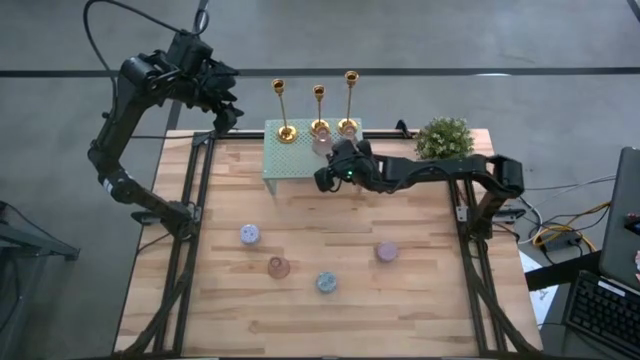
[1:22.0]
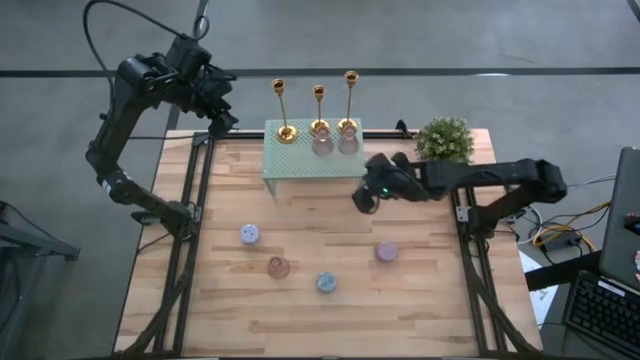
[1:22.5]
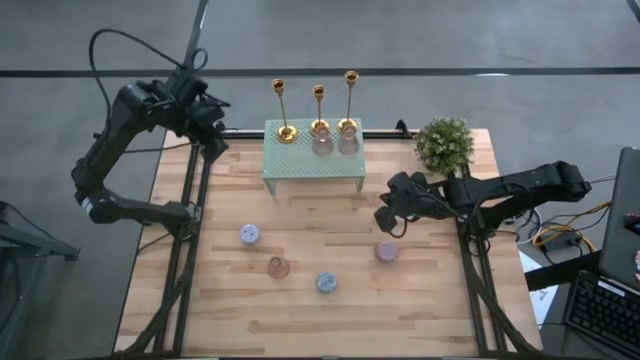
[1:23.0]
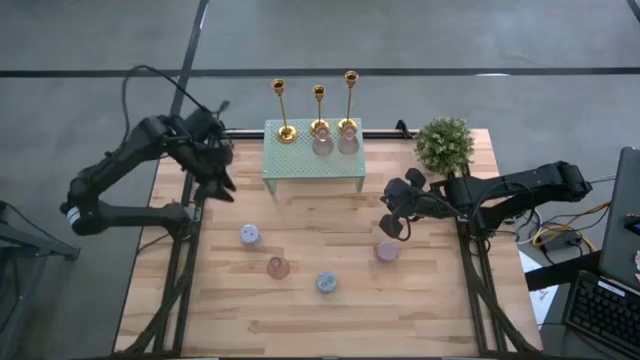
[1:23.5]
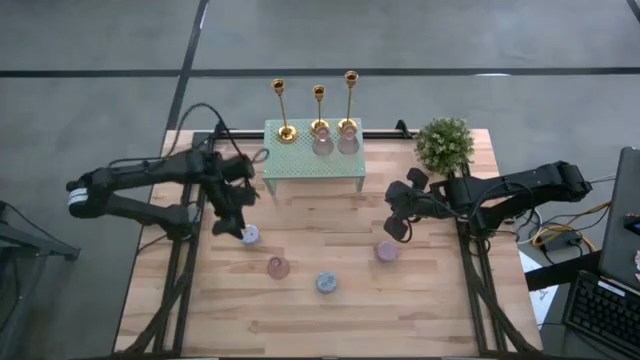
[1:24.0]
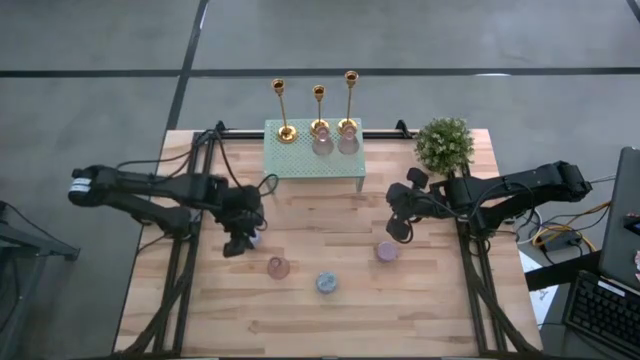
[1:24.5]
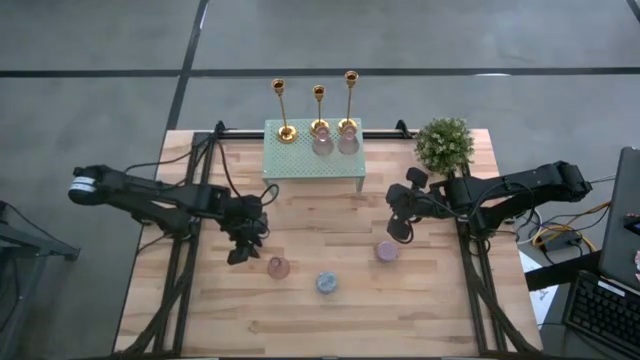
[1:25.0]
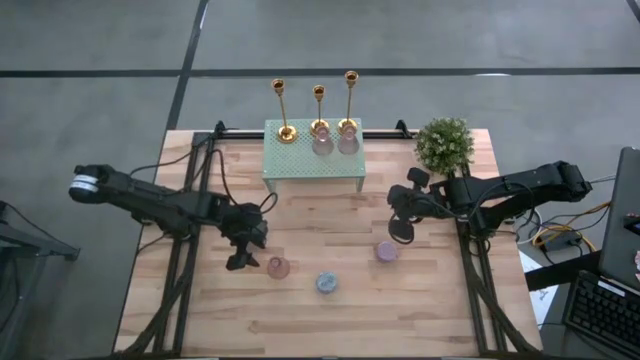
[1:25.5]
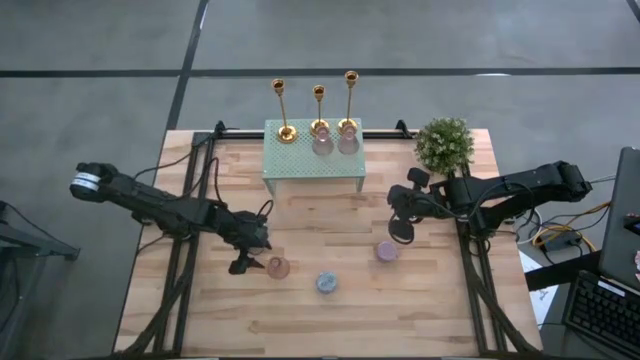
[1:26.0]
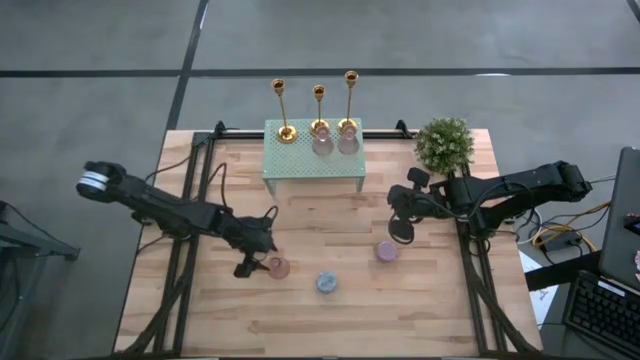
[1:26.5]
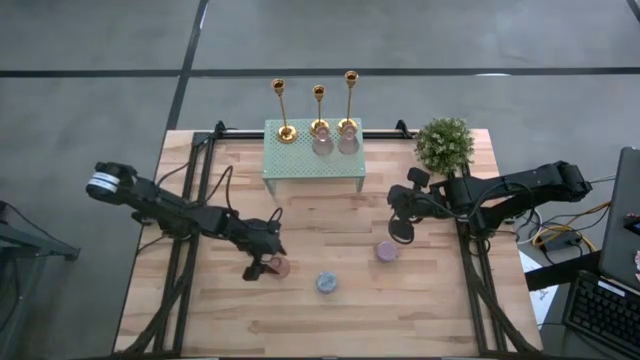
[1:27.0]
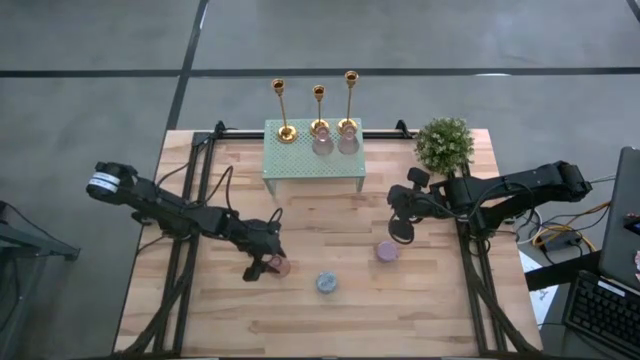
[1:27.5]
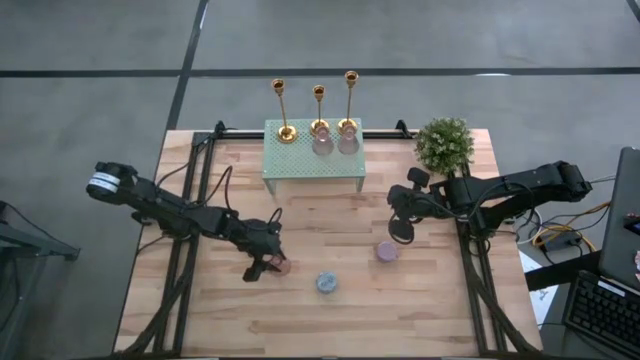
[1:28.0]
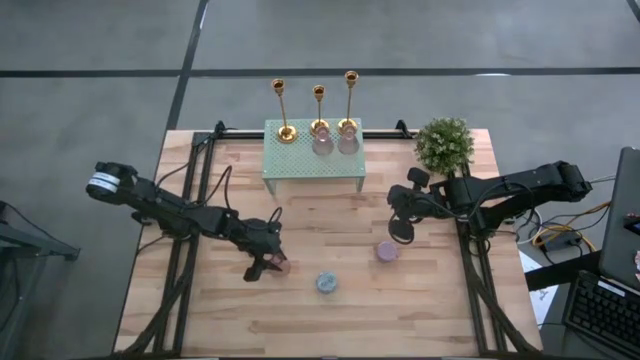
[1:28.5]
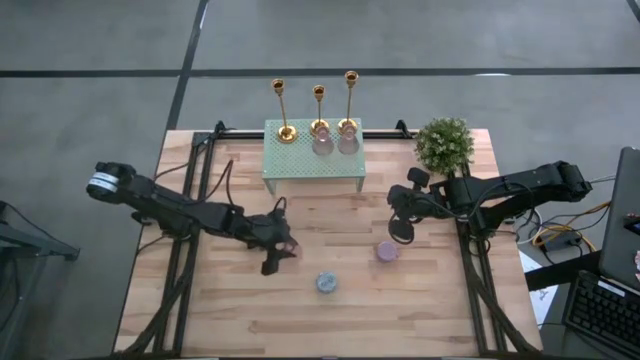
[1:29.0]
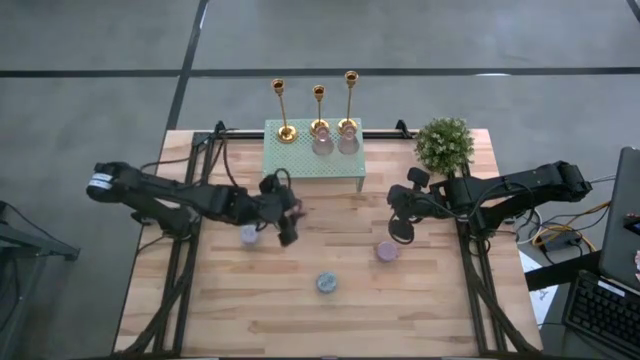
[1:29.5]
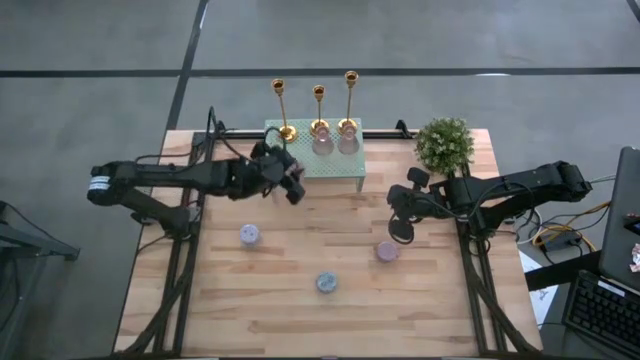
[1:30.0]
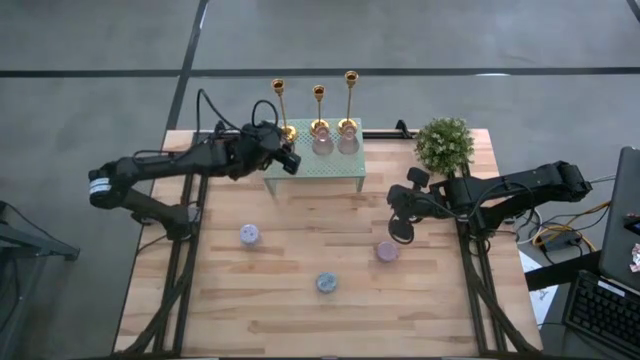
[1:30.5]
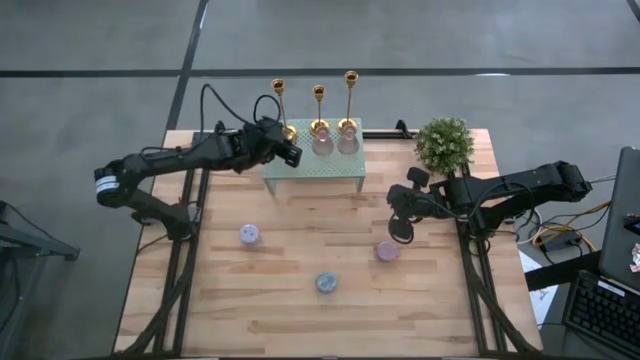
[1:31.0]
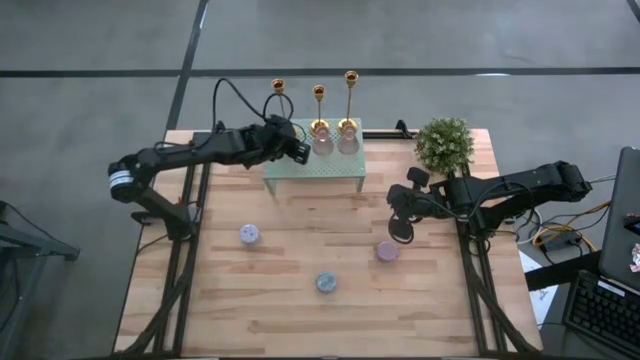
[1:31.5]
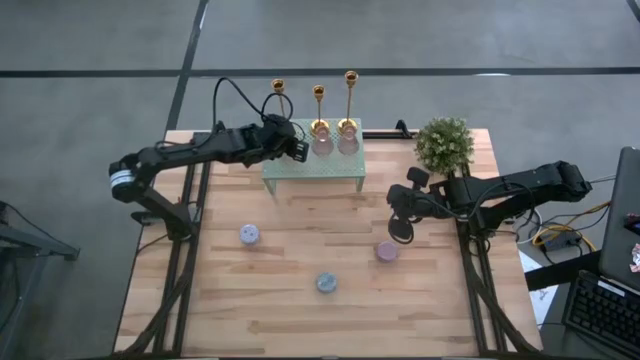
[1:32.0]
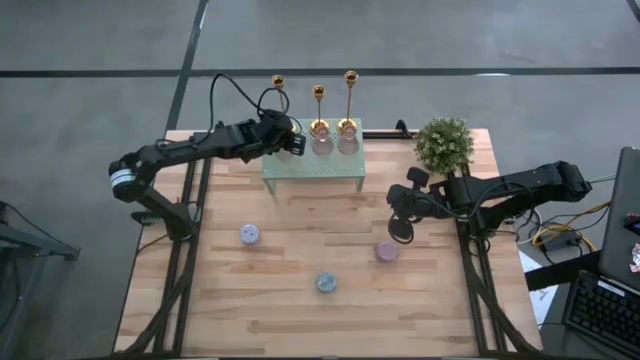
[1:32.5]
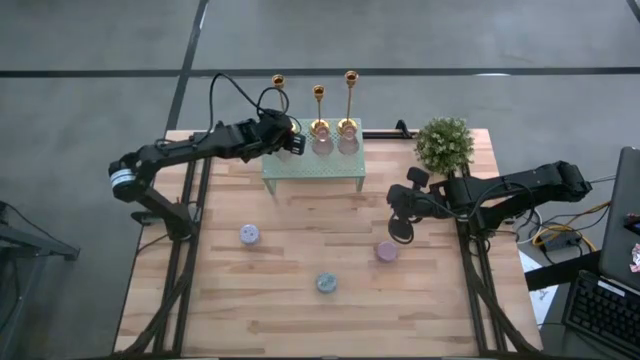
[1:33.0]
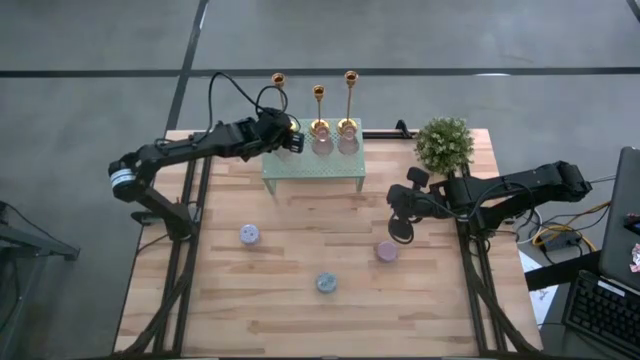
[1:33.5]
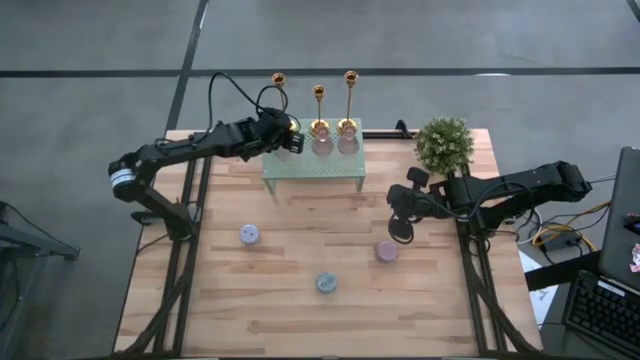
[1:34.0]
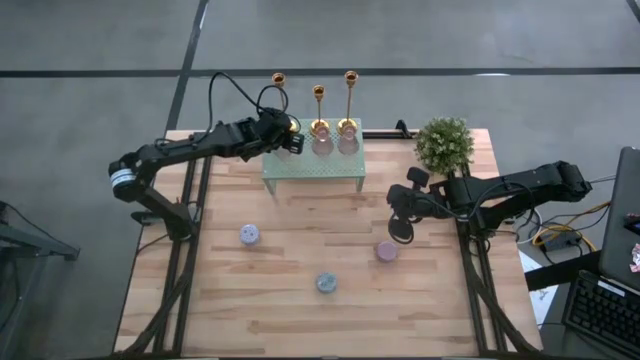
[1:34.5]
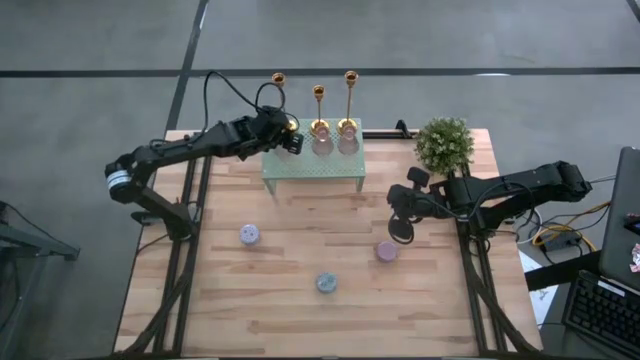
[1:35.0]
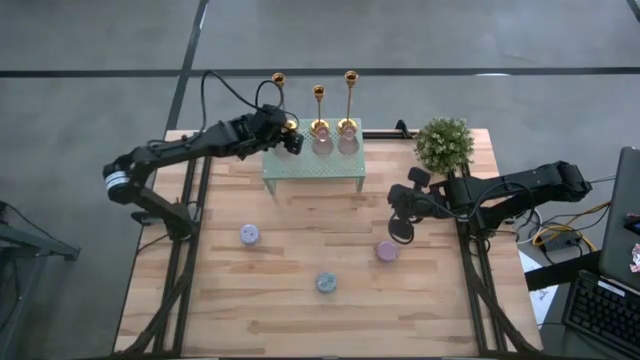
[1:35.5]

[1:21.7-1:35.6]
Task: Pick & Place candle stick holders
Put the glass candle holder on the shelf

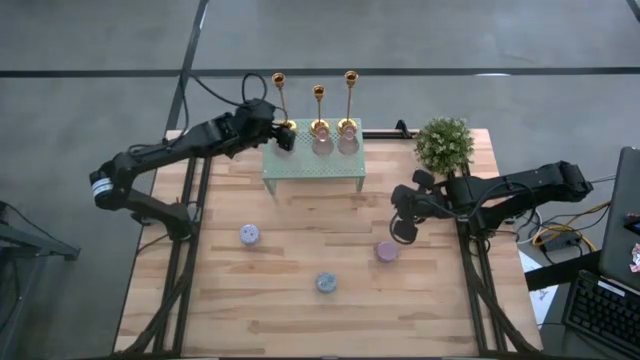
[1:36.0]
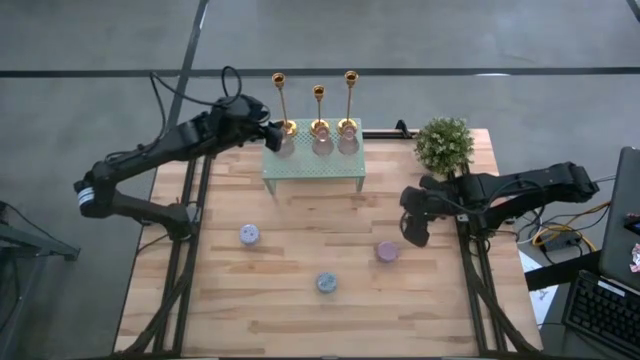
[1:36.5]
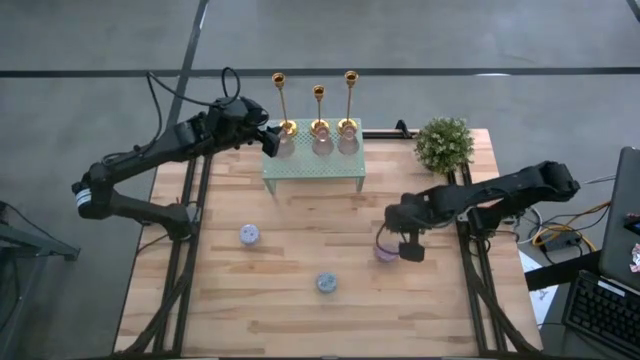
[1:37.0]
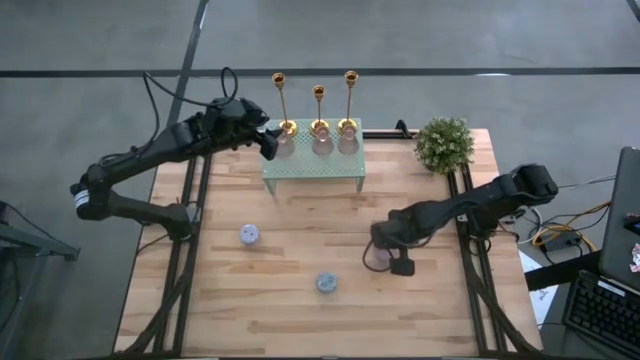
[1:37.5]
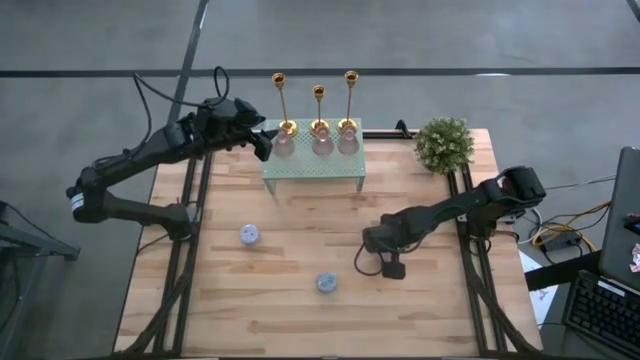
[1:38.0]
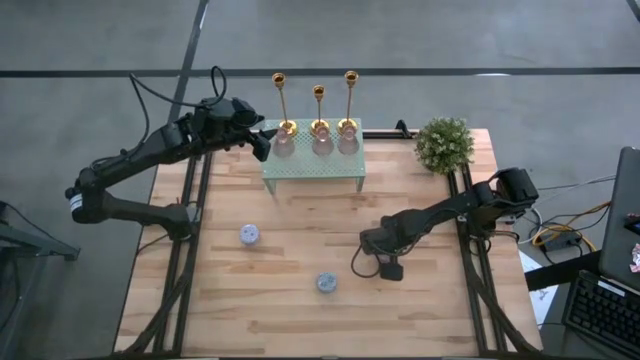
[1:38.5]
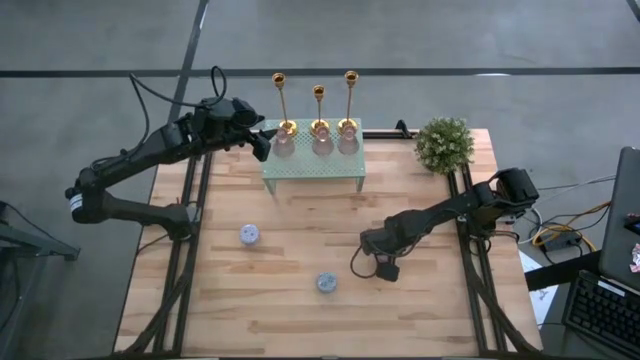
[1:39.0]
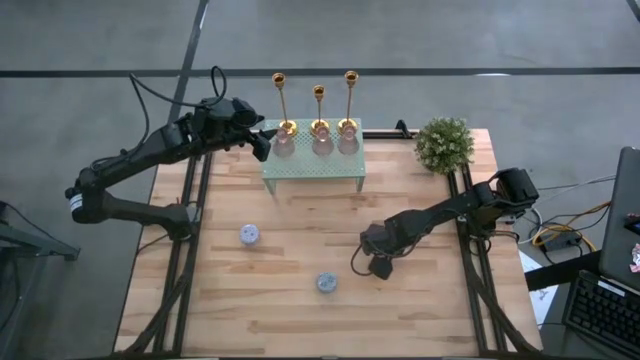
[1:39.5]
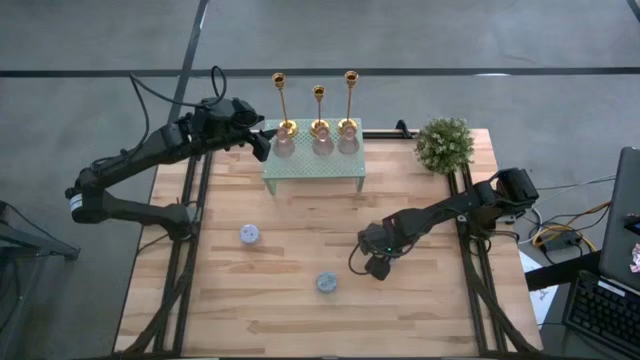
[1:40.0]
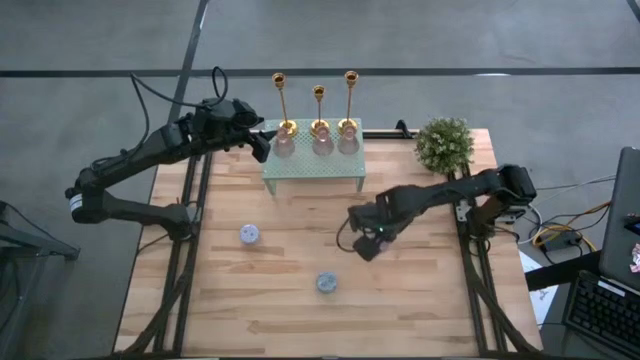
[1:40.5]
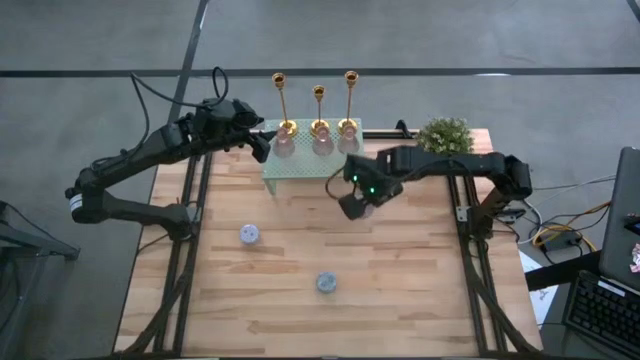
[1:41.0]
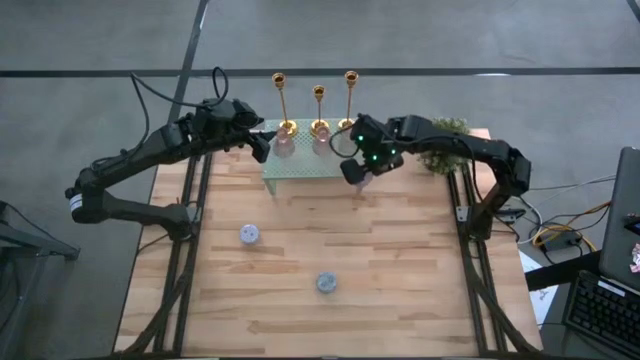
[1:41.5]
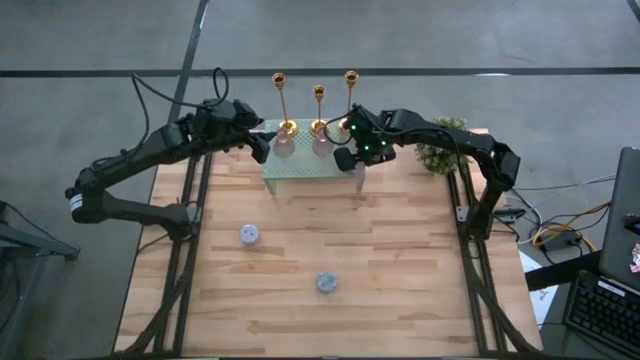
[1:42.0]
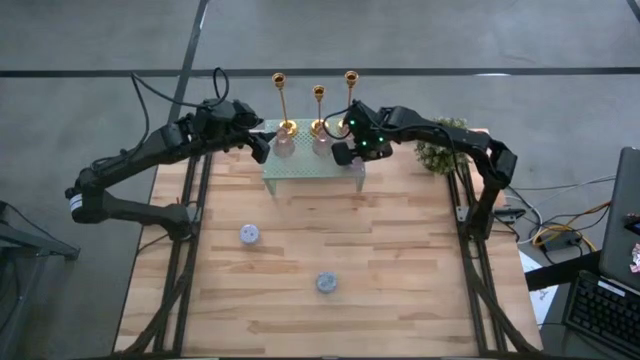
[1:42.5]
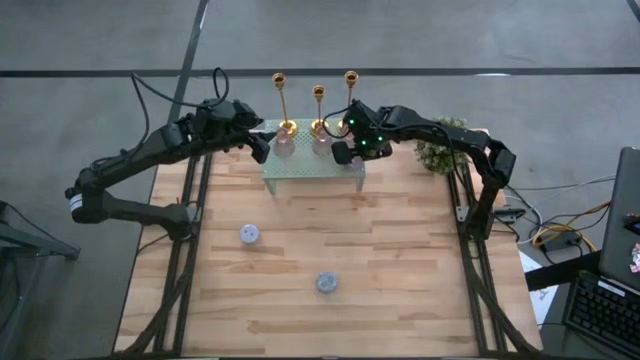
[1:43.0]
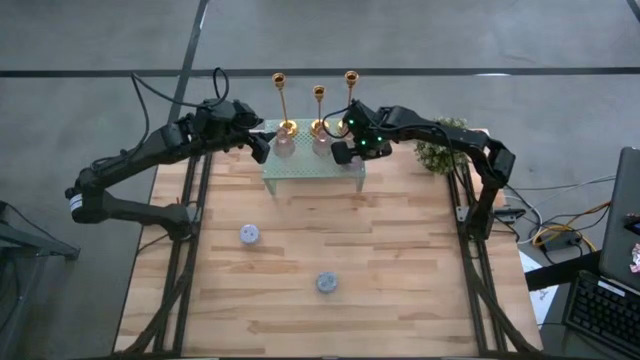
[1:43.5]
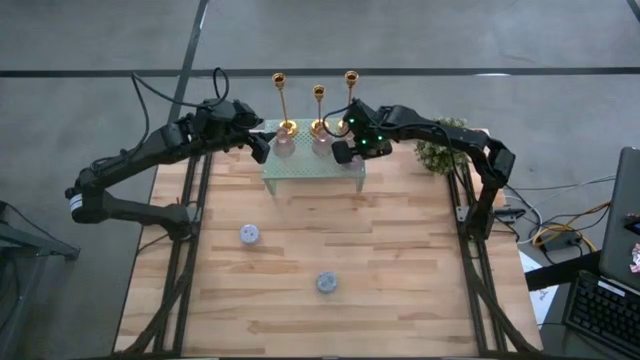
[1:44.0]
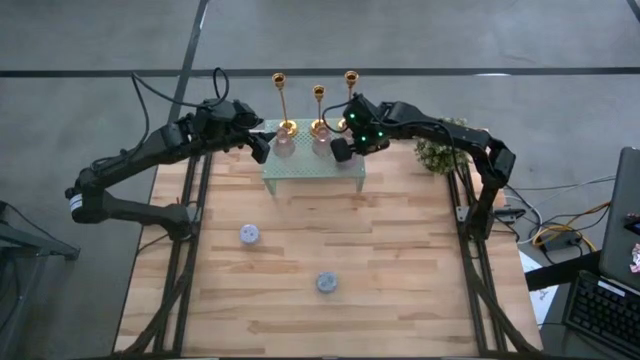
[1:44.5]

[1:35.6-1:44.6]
Put the pink scented candle on the shelf
